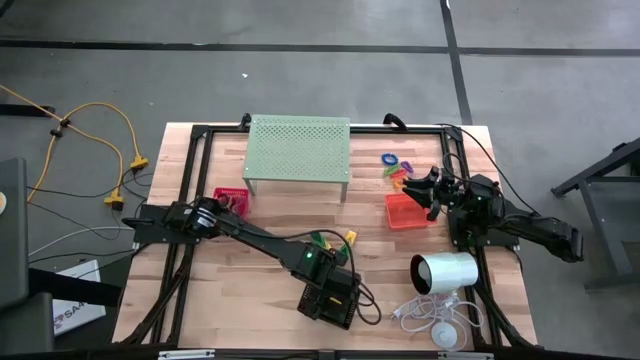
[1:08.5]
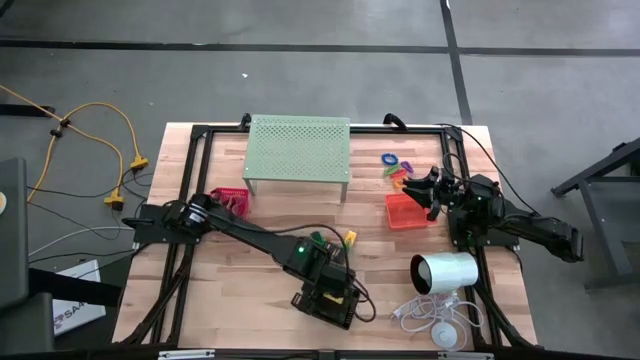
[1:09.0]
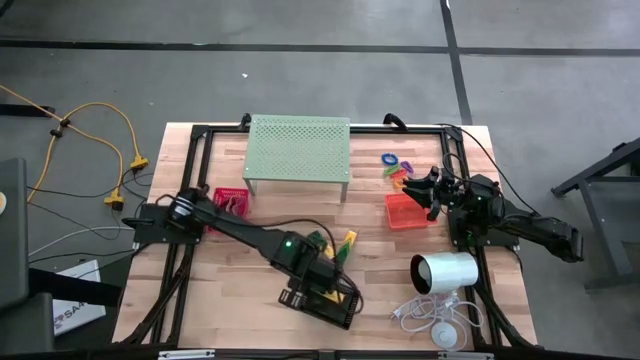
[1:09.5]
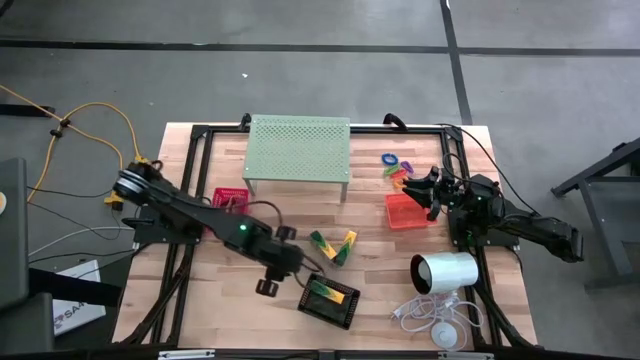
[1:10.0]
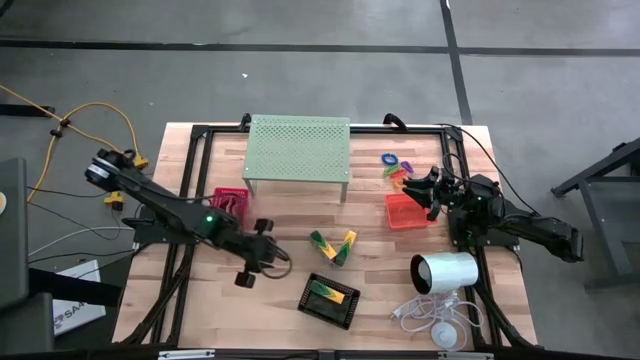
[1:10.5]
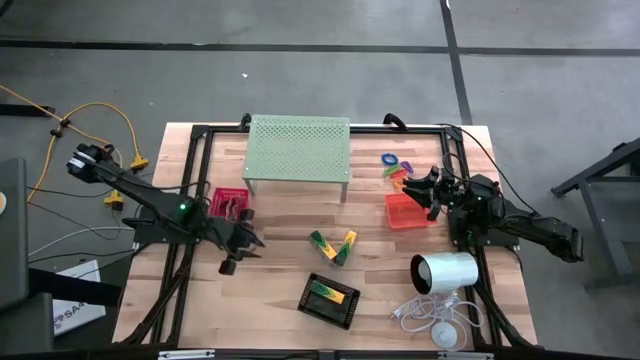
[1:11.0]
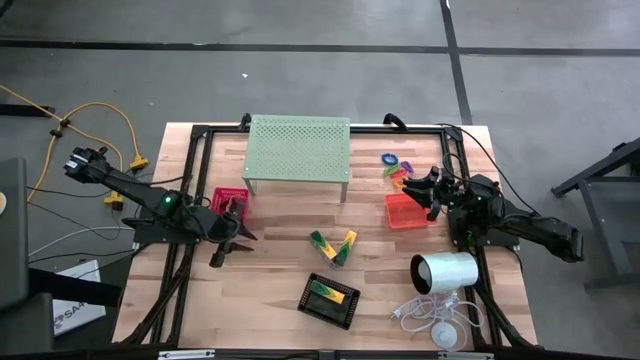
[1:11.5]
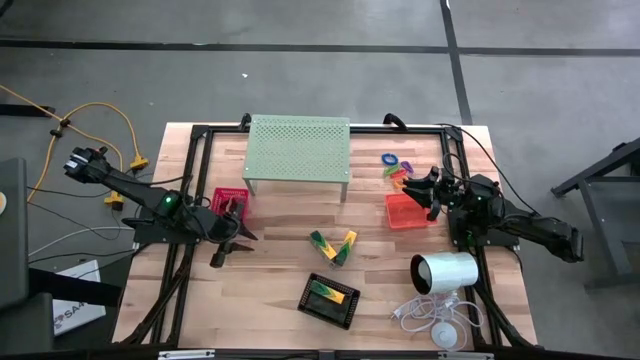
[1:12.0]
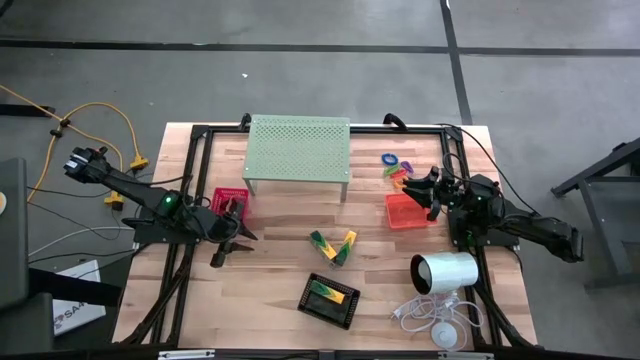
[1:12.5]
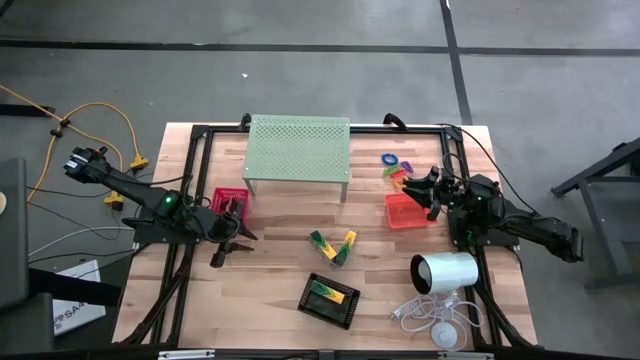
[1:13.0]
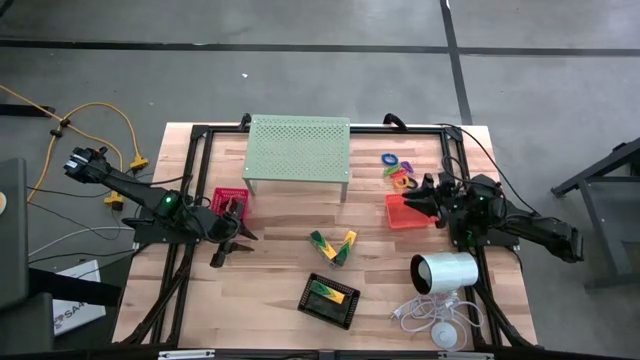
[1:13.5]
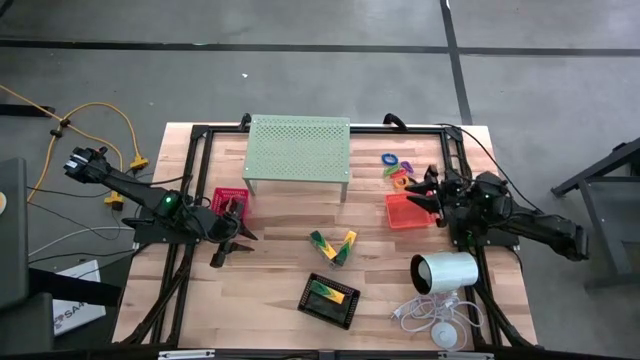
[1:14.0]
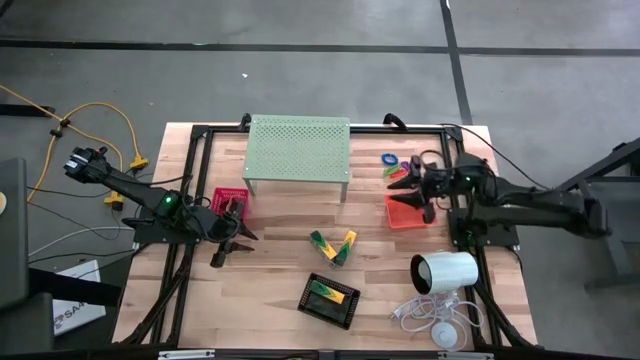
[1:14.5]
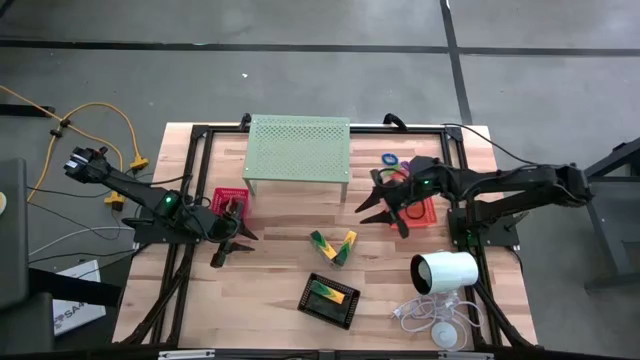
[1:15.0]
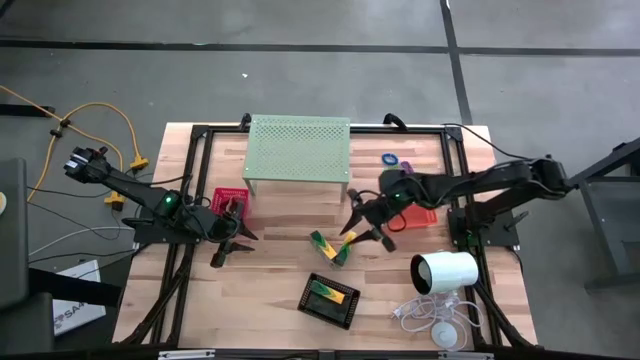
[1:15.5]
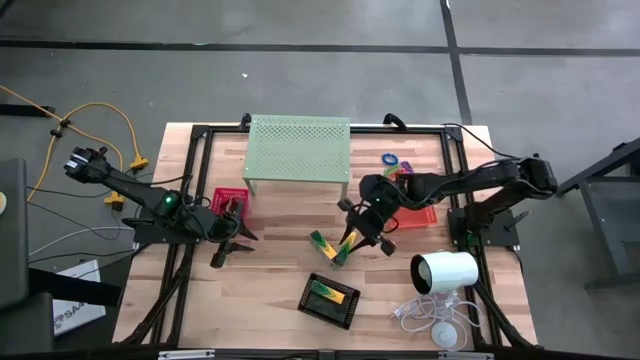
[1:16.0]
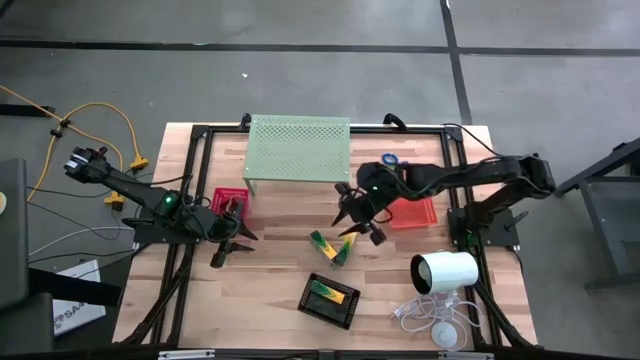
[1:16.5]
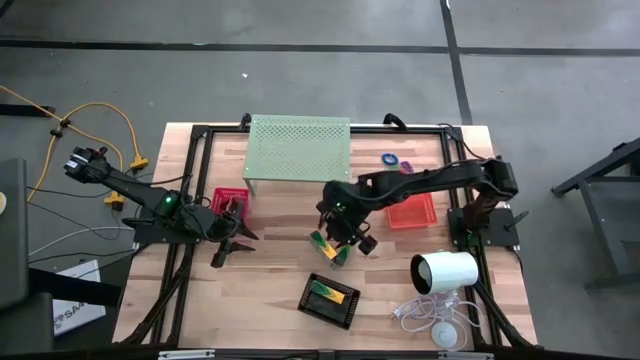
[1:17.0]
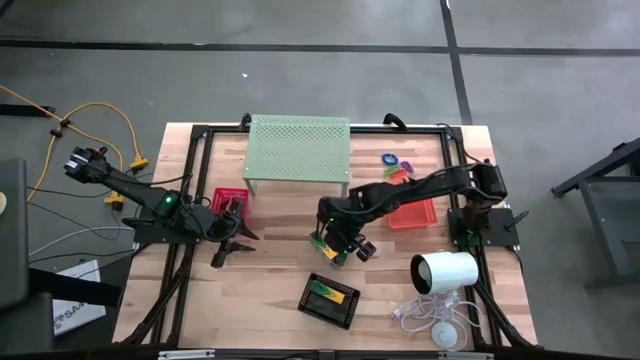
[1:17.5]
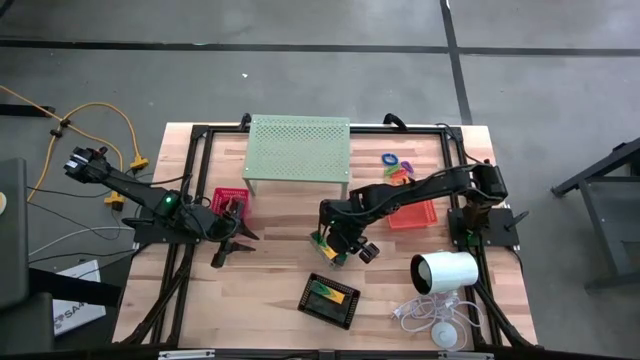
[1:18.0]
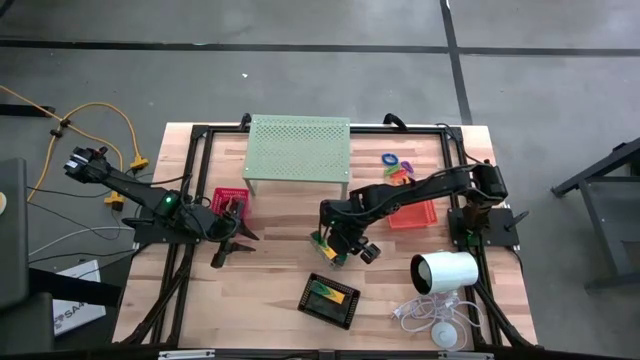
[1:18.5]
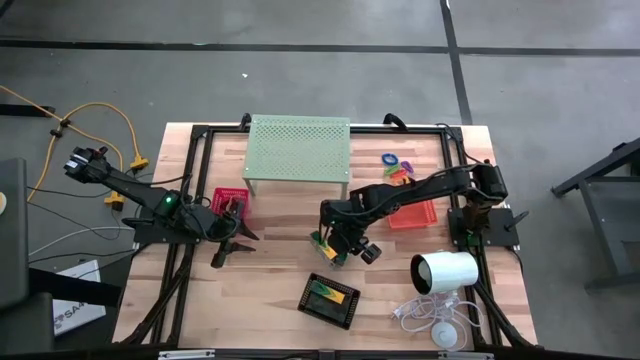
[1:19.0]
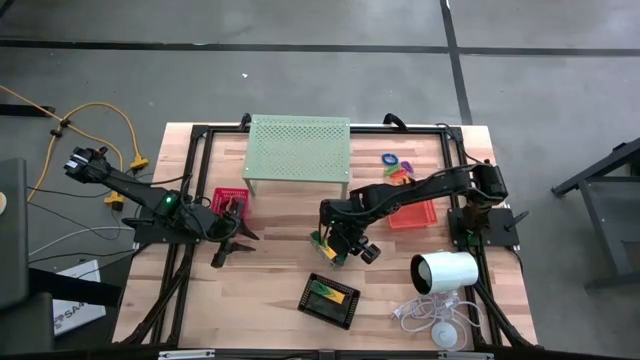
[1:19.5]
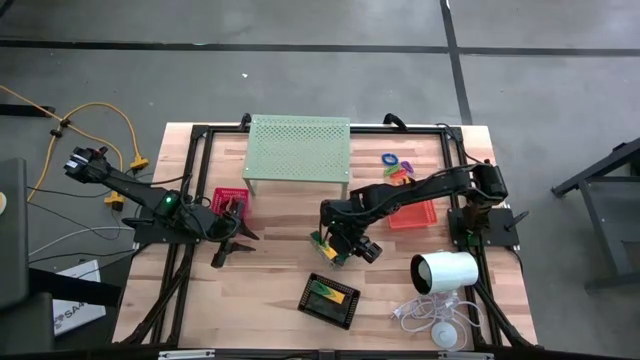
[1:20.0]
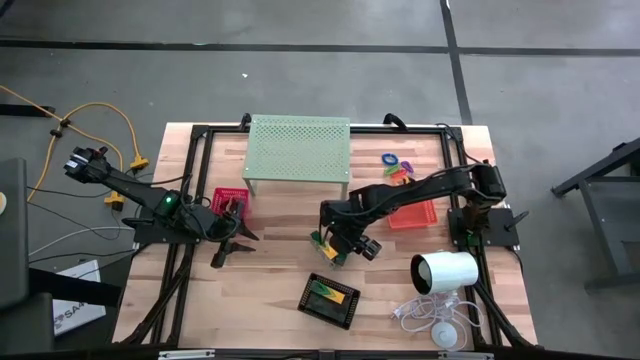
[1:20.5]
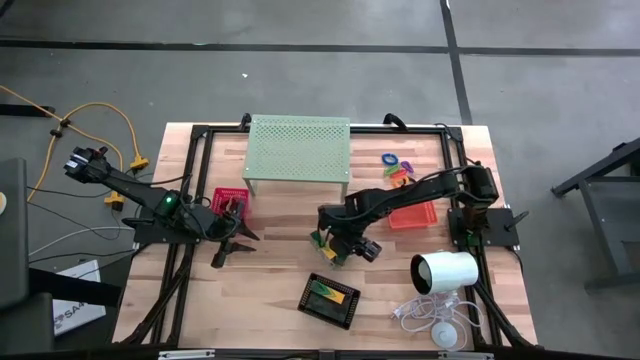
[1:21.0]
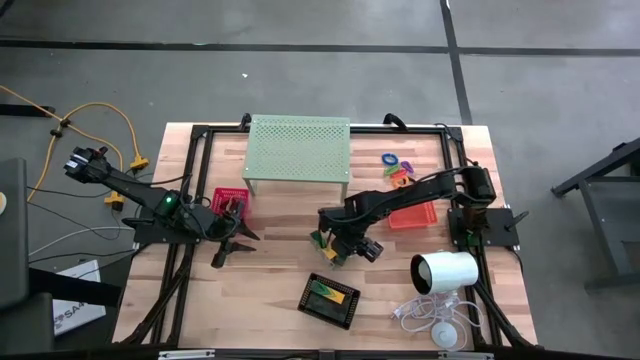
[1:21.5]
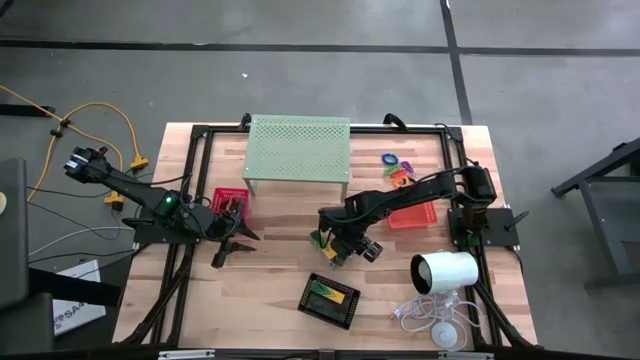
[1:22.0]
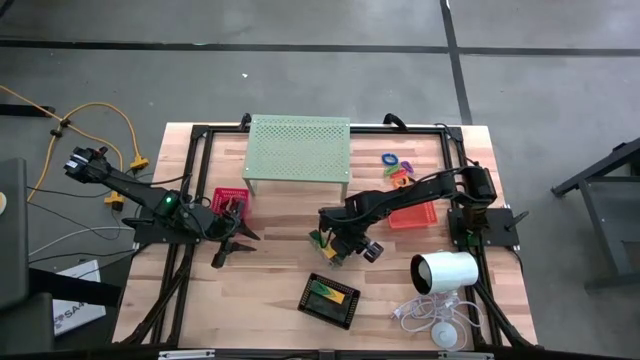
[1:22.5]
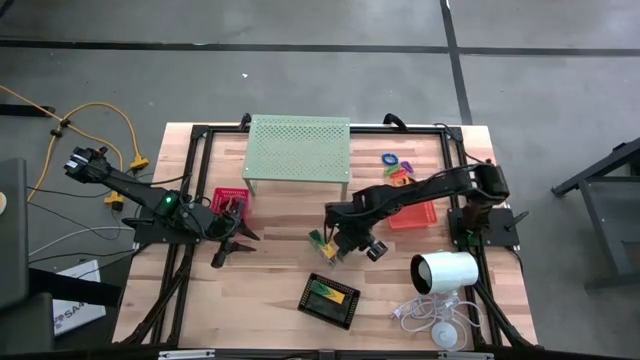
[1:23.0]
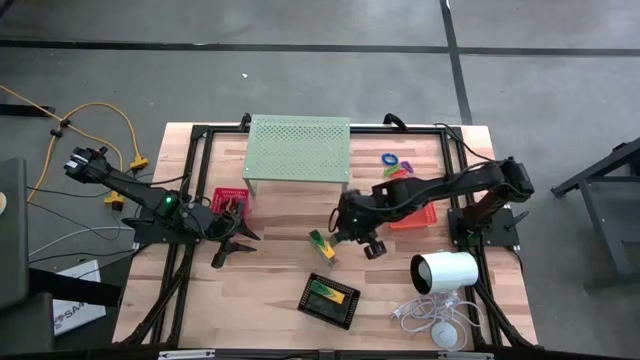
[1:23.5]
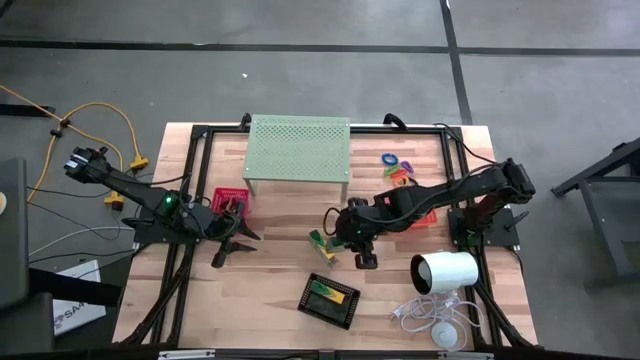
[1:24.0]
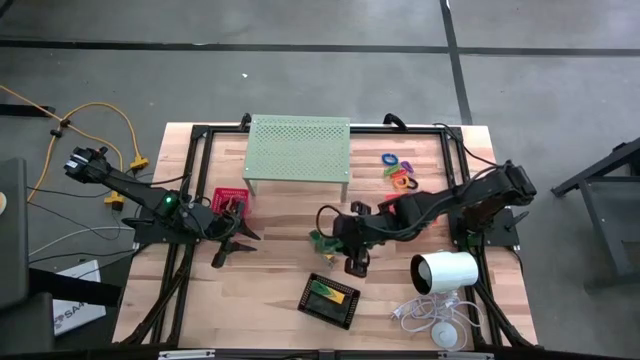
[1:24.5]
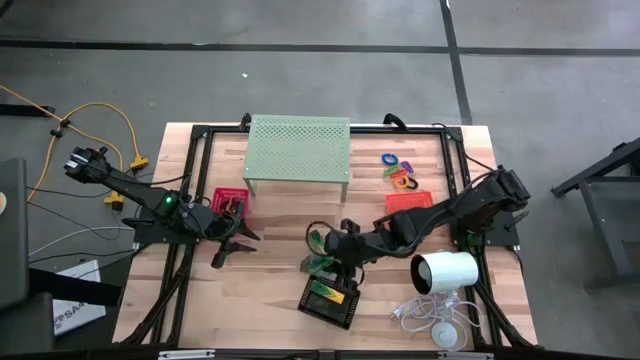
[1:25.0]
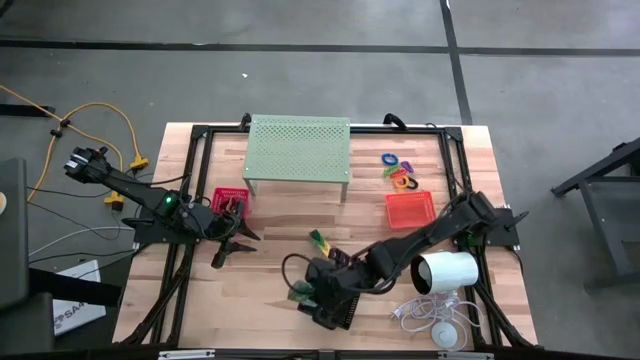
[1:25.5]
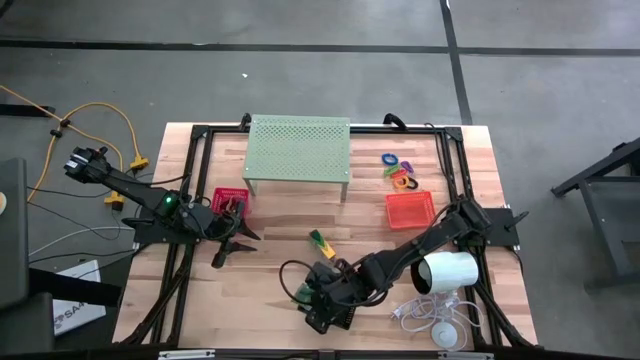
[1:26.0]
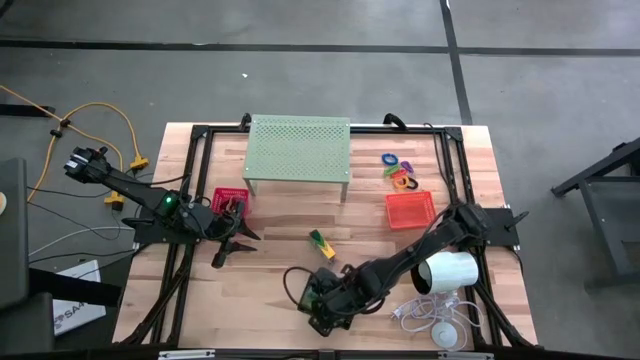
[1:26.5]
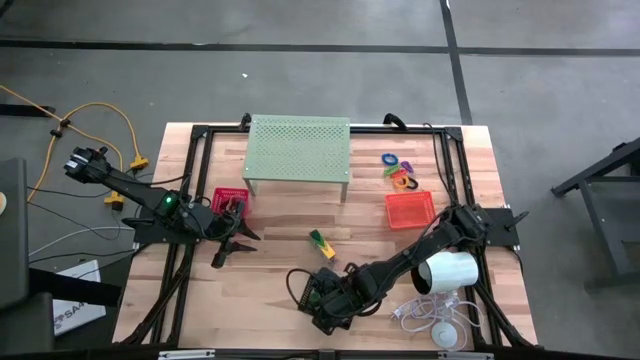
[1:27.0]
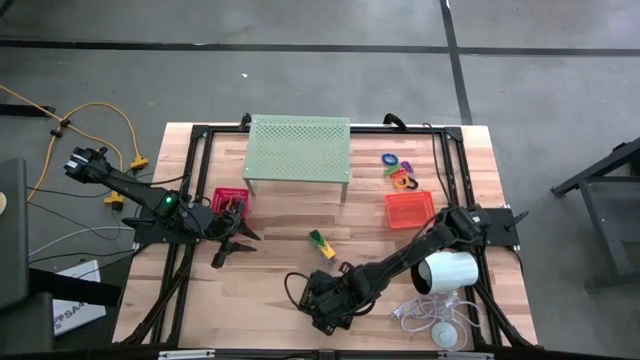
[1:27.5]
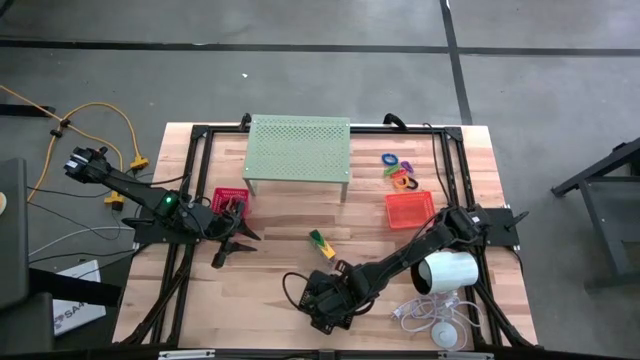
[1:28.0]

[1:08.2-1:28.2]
Task: Pick & Place Office Desk Supplies
Put the crayon box into the black bin

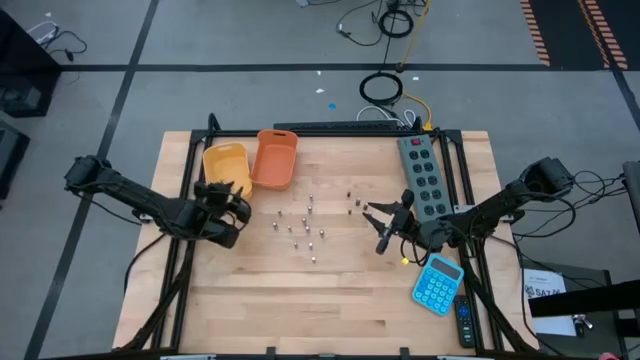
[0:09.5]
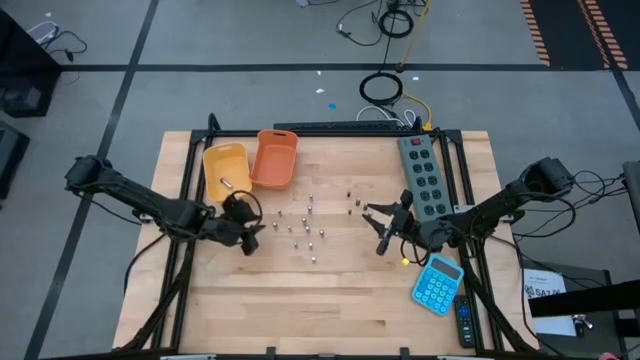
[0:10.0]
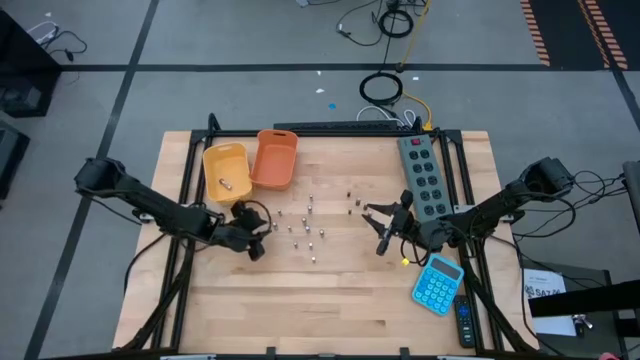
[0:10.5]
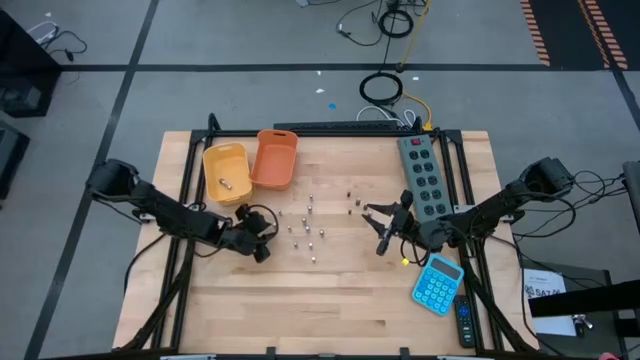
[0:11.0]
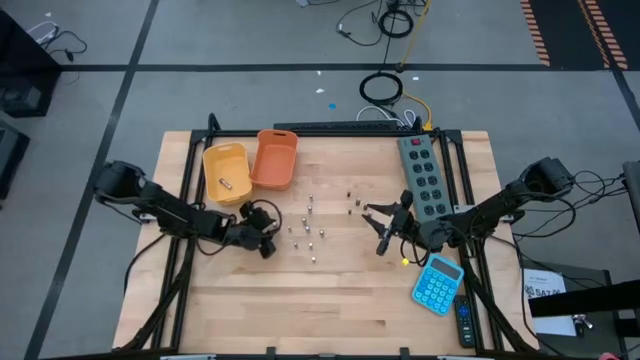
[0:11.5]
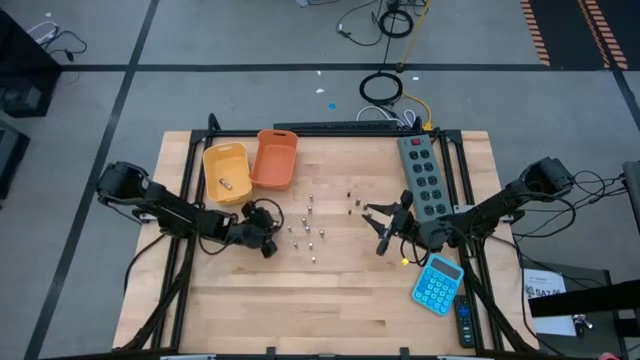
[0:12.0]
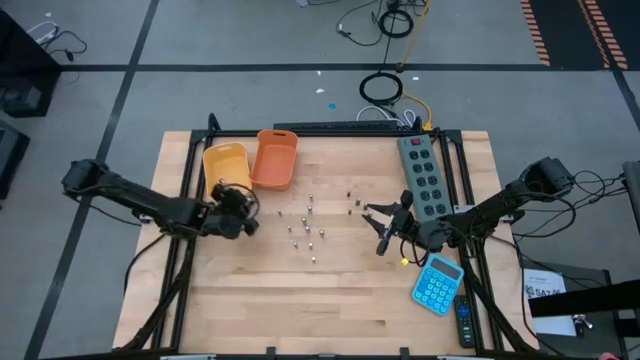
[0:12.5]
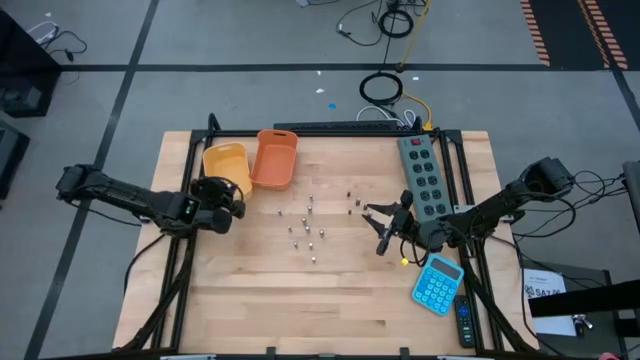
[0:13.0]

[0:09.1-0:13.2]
Task: Sort batteries
Put the silver battery into the yellow bin
